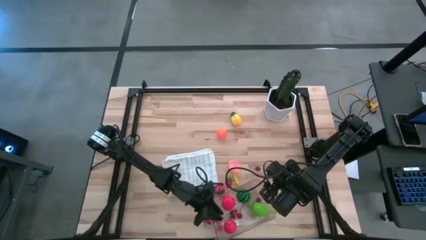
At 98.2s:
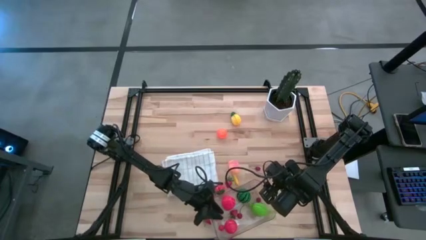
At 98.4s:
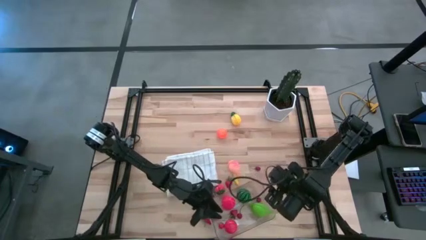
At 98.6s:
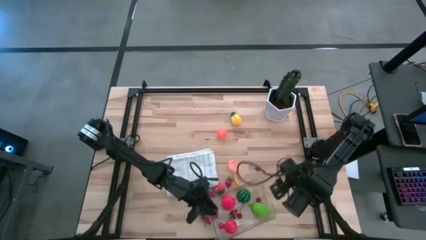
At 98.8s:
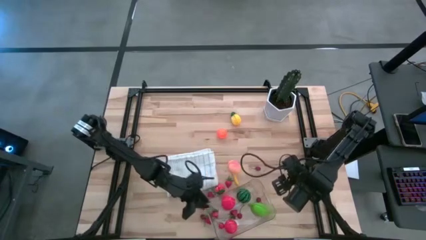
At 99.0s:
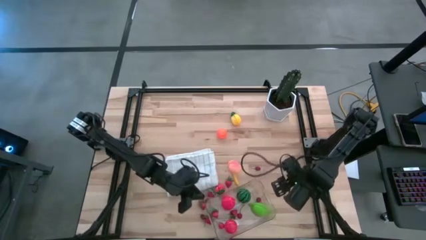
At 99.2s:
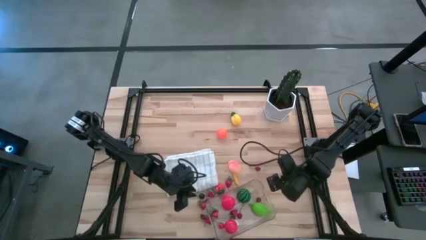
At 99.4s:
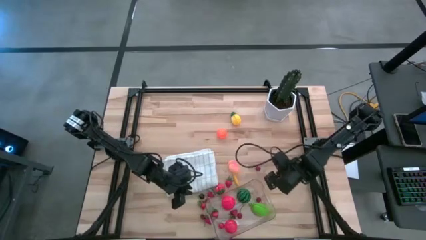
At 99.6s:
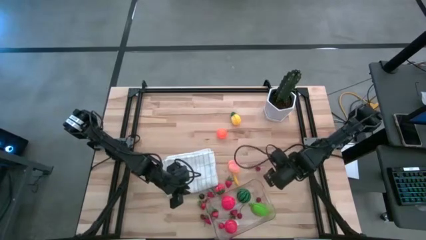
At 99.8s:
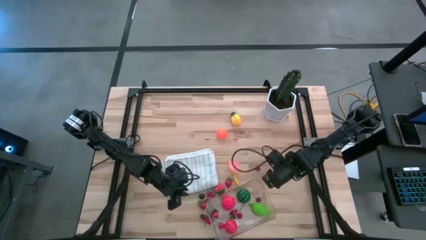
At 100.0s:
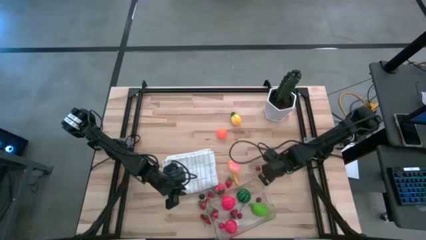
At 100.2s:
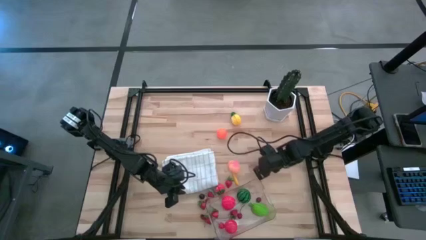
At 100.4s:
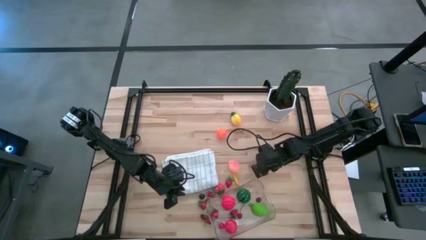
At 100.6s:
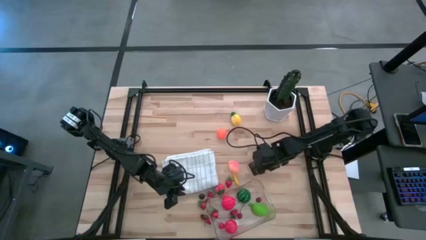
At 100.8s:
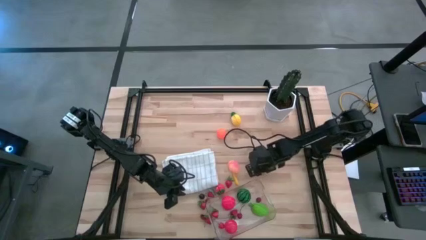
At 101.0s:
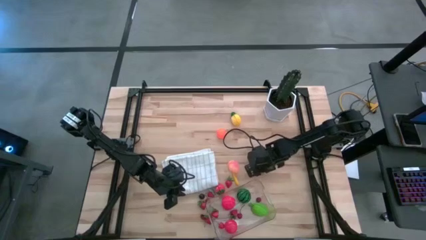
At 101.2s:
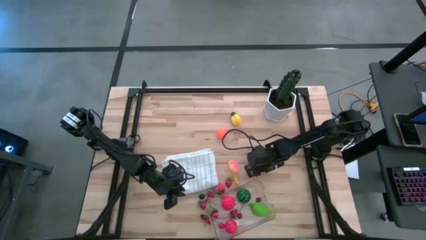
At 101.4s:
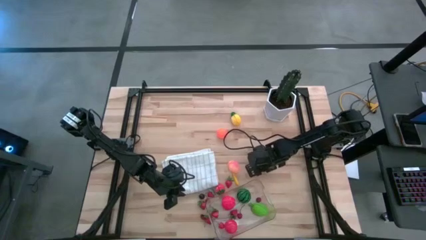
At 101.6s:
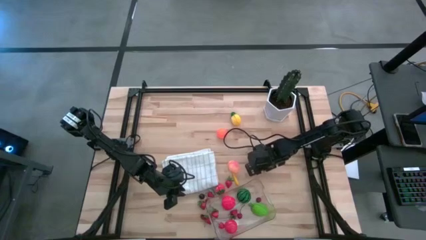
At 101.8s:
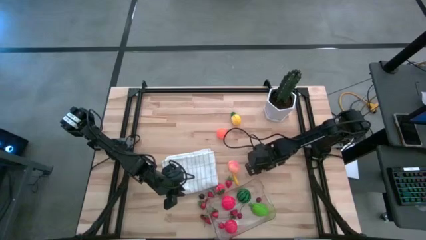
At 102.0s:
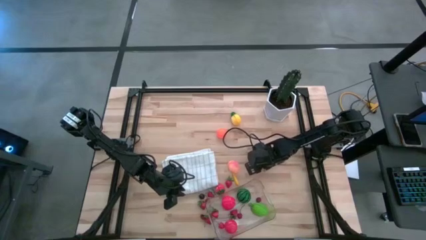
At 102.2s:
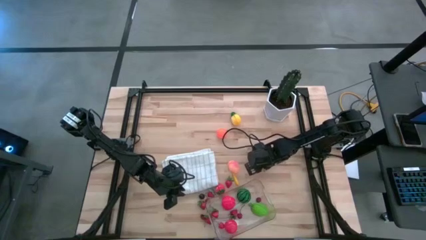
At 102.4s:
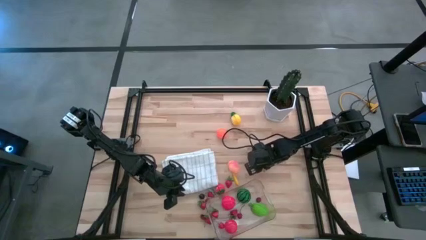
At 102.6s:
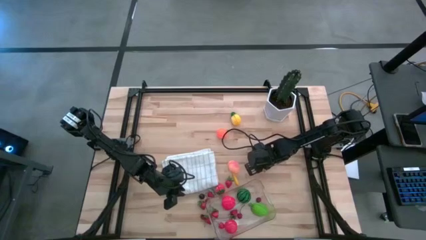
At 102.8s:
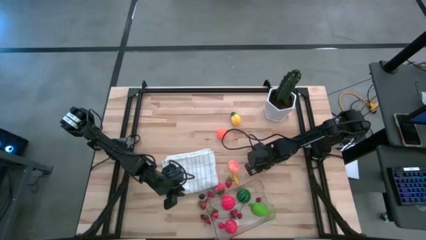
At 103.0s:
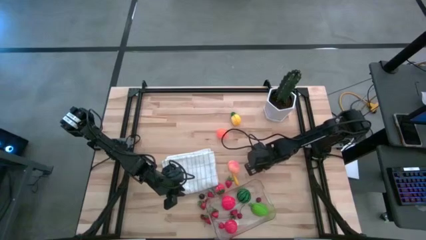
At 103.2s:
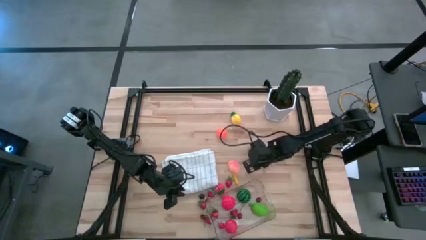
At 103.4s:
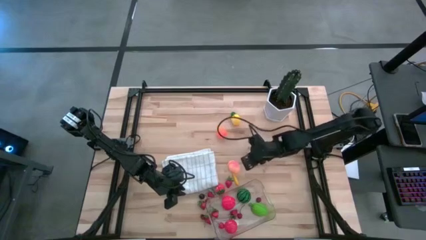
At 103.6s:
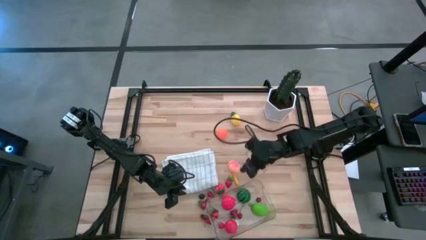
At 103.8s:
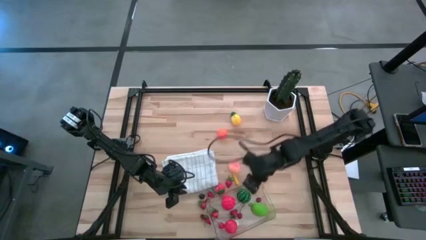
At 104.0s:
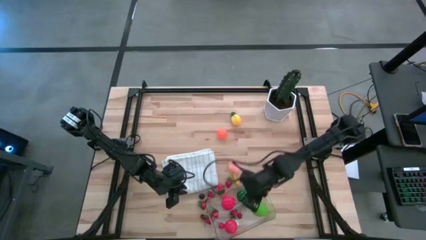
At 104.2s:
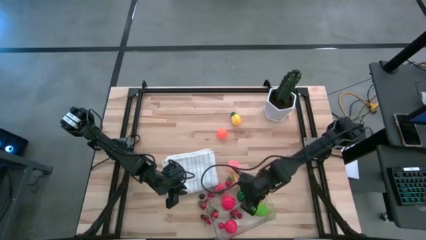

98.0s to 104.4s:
Task: Pick and placing Produce into tupperware
Put the red cherry into the transparent bin

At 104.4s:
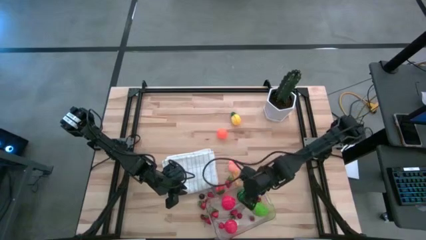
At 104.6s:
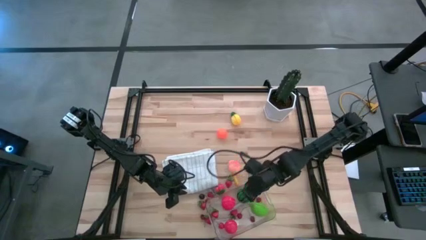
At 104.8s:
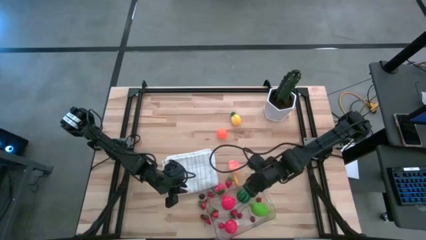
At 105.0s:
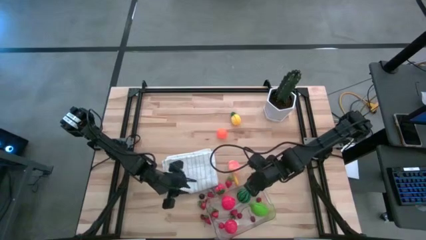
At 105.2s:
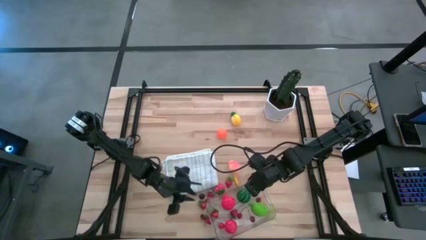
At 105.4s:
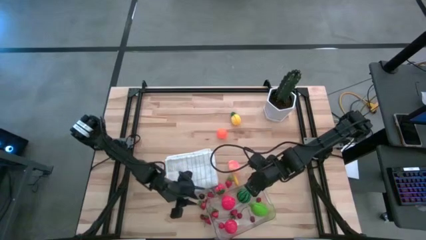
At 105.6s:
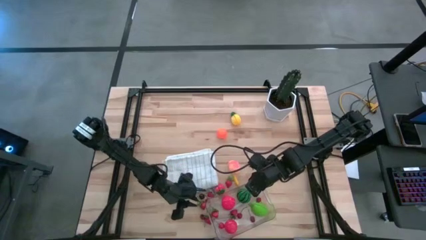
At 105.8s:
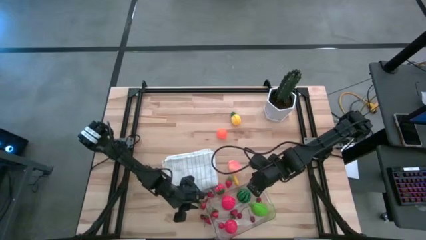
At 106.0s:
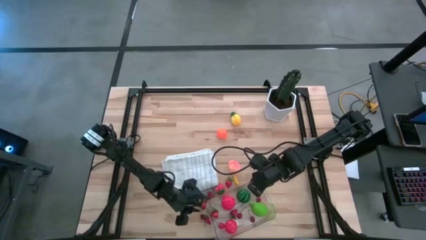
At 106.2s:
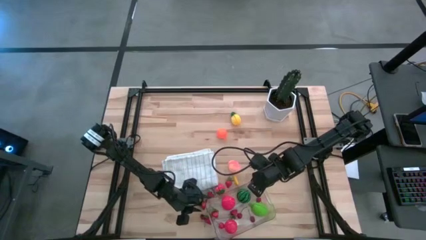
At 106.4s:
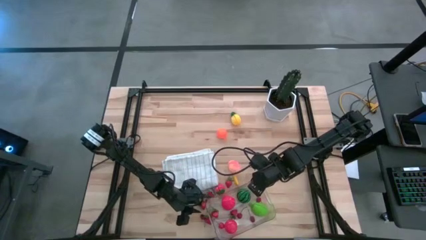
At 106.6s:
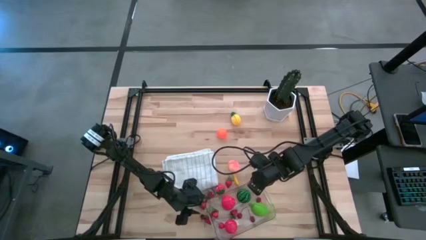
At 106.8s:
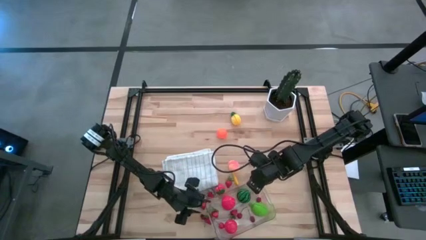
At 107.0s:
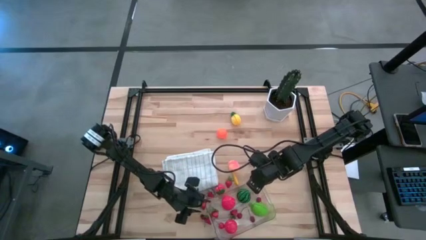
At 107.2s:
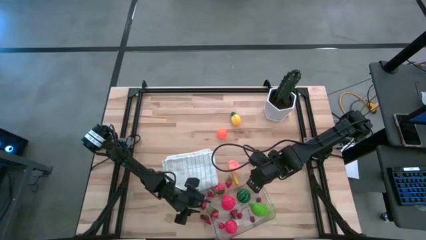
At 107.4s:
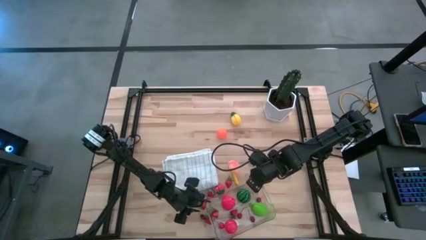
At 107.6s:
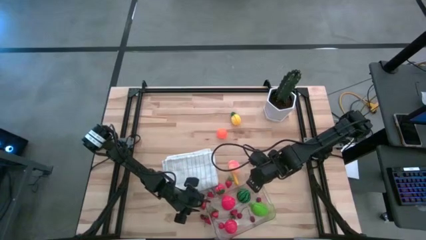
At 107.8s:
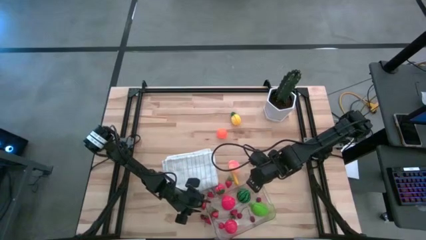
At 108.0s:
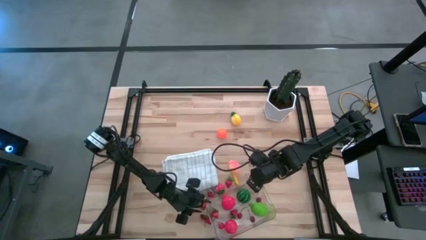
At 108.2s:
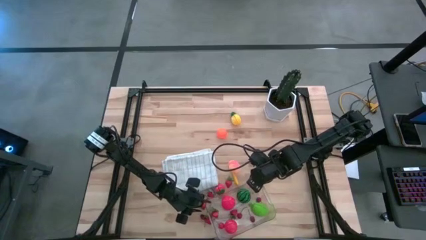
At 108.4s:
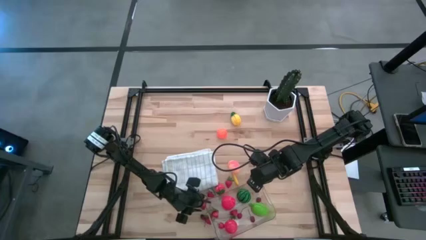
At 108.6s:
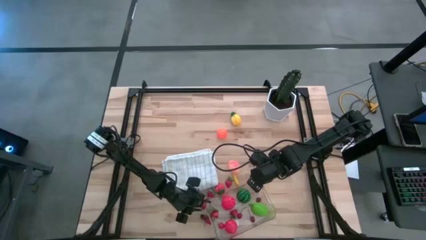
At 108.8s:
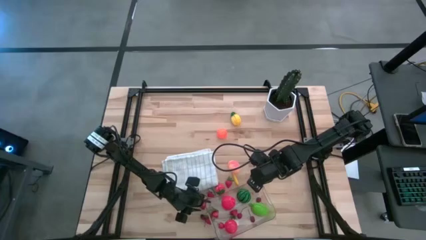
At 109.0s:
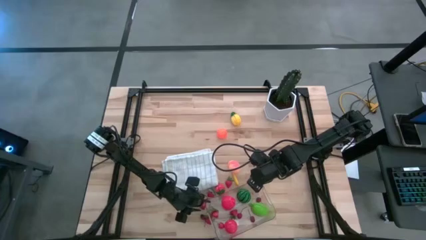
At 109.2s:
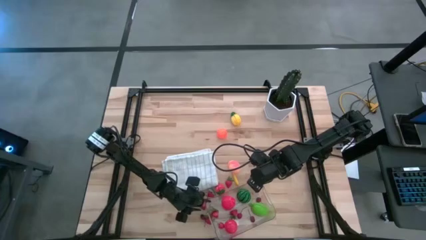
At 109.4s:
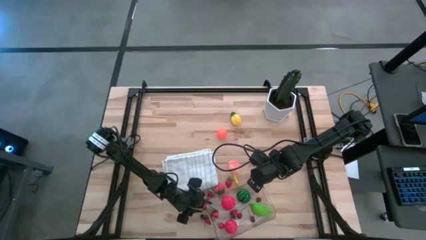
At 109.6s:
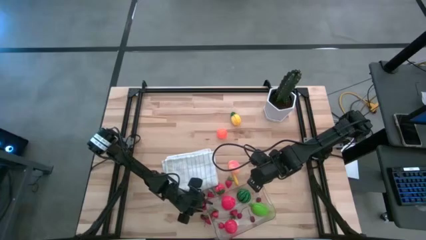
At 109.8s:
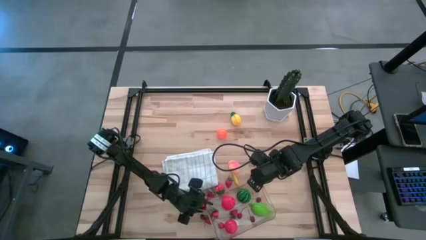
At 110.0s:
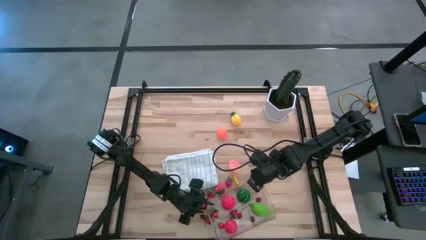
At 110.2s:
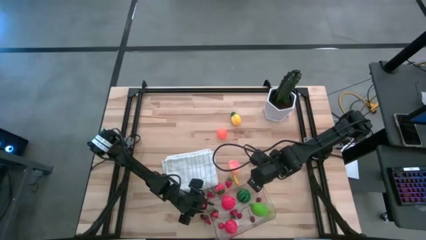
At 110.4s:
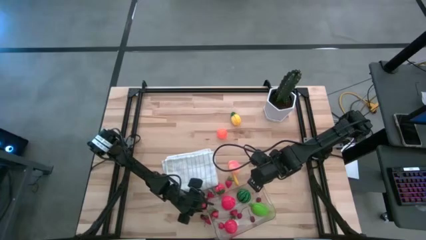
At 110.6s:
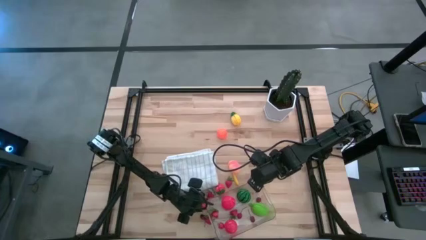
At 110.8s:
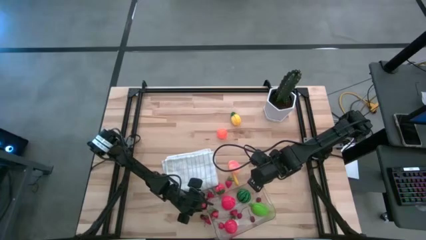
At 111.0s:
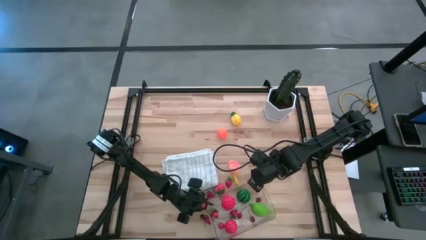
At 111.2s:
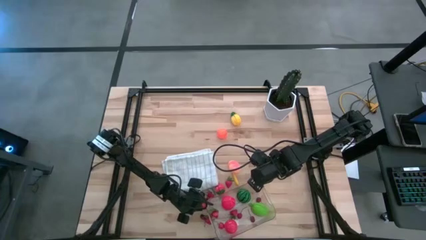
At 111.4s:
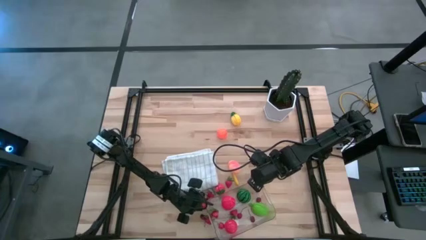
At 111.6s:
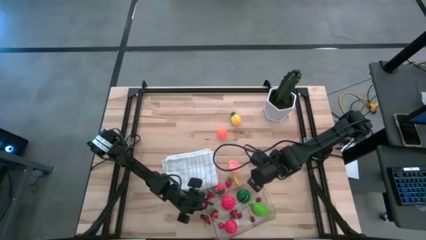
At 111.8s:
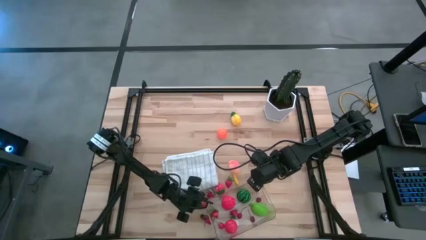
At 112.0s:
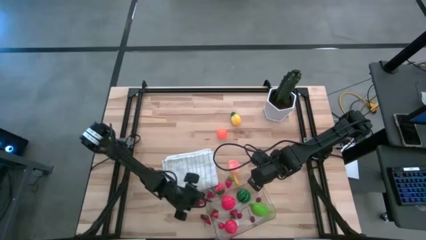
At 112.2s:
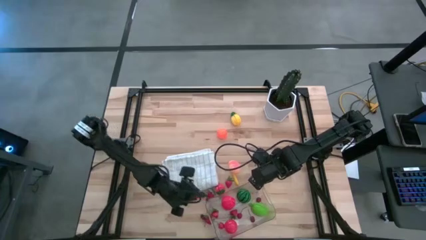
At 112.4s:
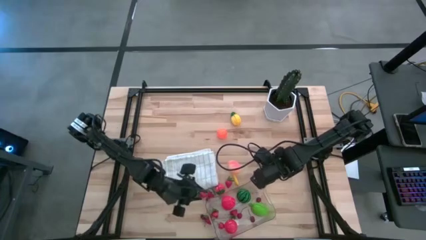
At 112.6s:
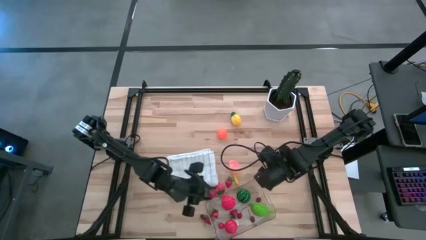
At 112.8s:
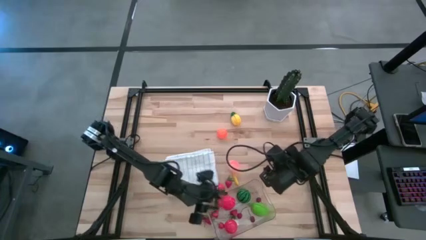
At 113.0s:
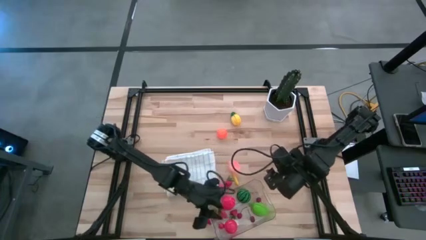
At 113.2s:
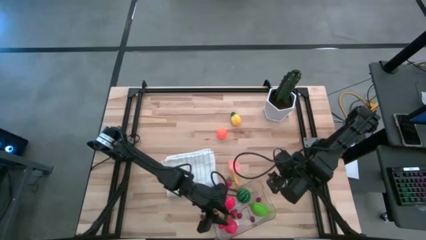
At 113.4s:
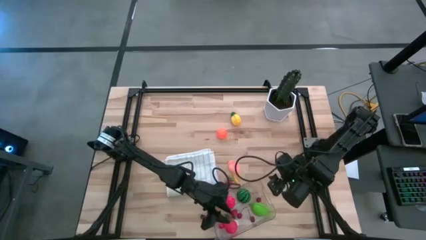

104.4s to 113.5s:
Put the strawberry into the transparent bin

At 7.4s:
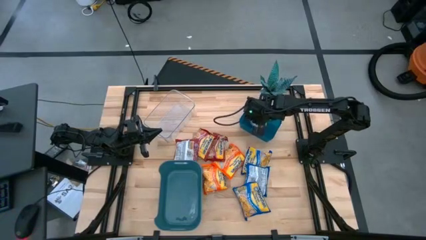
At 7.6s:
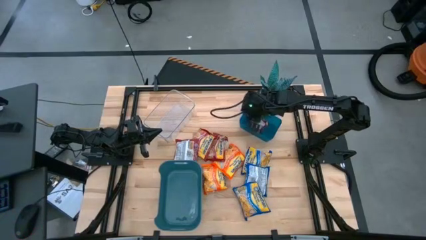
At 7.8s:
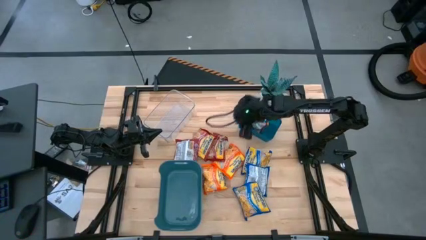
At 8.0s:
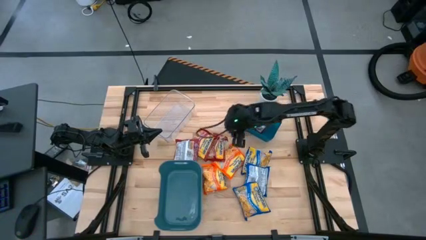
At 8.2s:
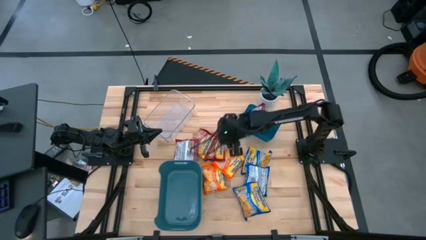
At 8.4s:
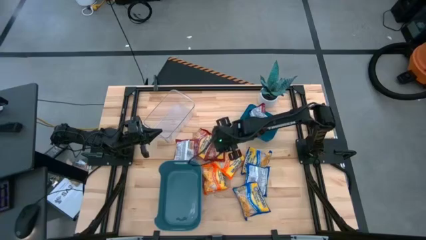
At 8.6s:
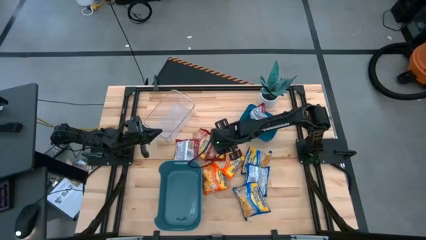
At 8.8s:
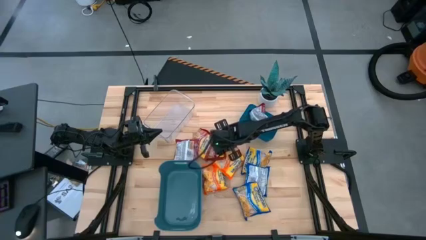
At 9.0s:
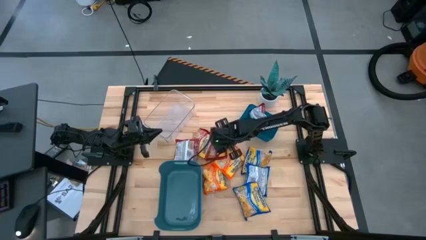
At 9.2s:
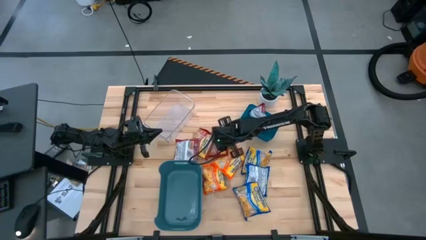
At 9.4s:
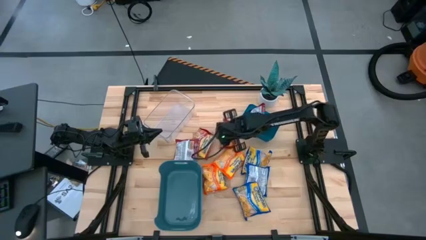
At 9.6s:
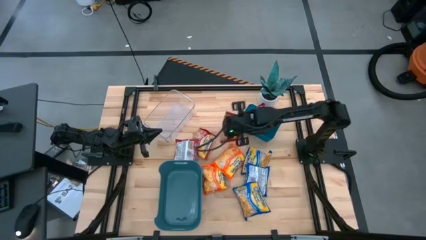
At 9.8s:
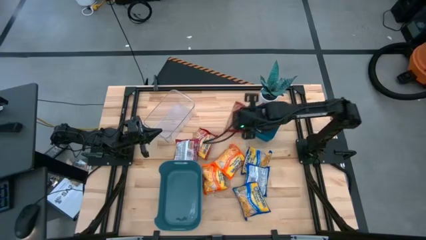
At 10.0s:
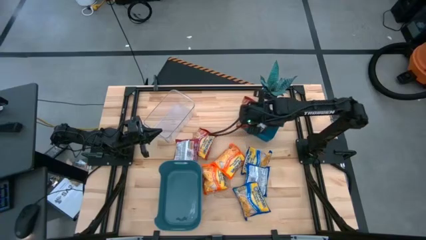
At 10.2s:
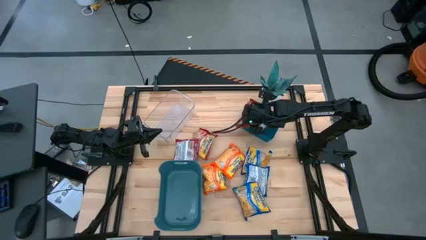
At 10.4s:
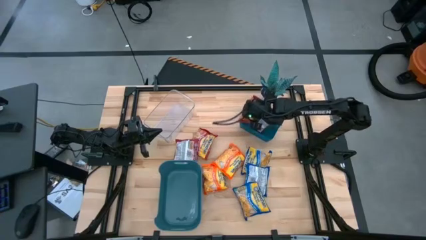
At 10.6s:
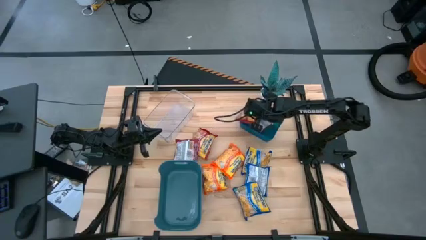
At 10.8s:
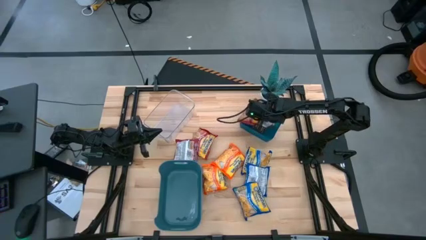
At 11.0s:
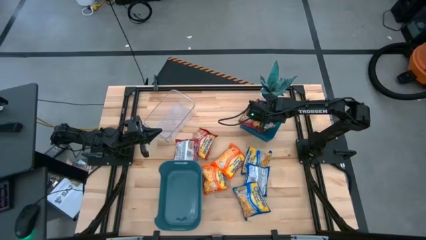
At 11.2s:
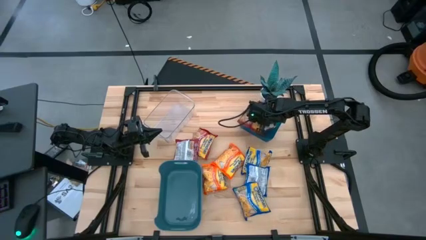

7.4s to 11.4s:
Task: Sort Maruchan noodles
Put the red noodle pack into the small blue bin
